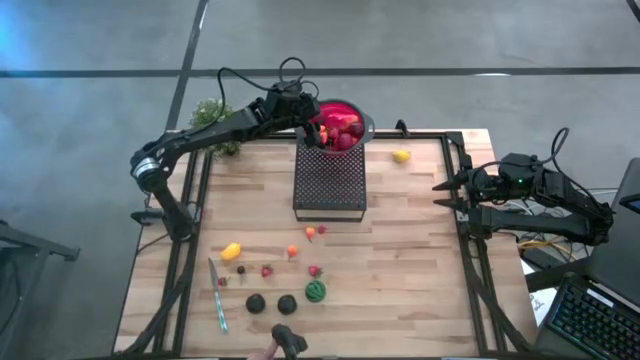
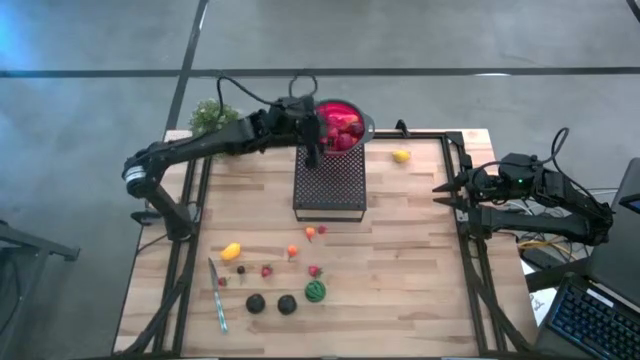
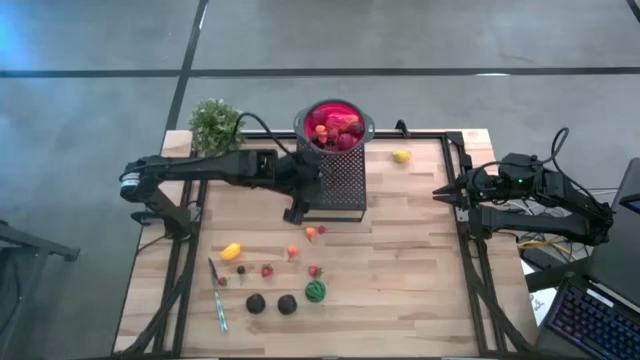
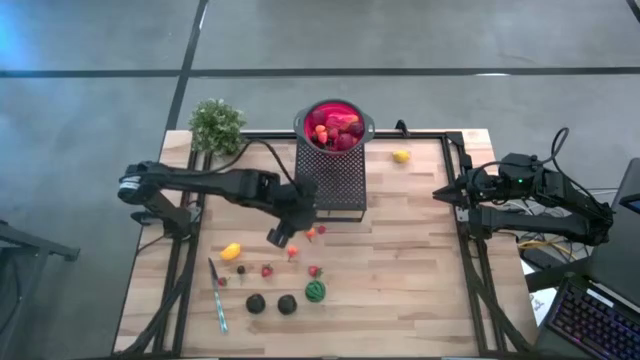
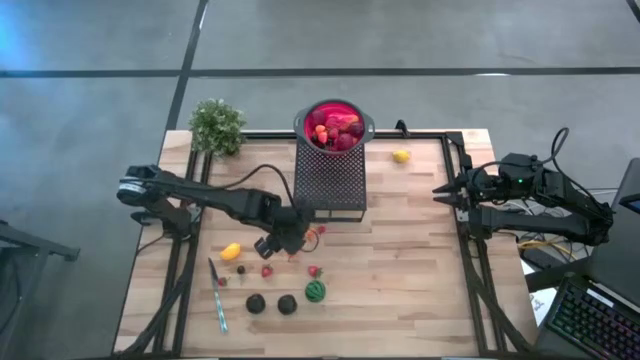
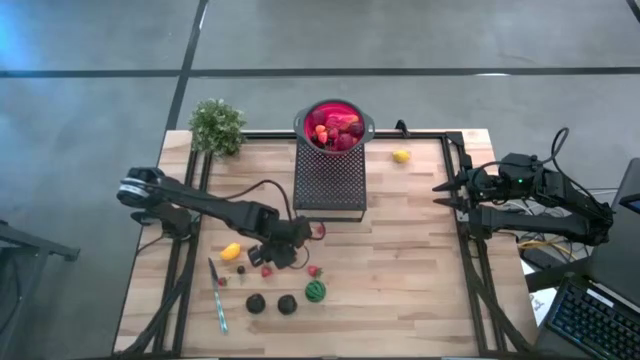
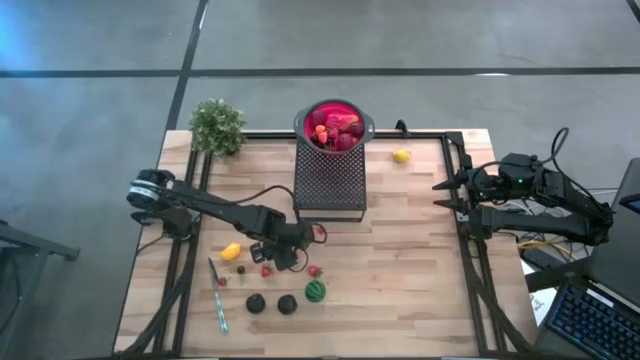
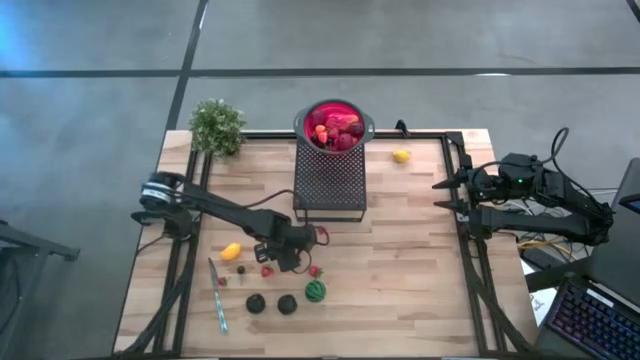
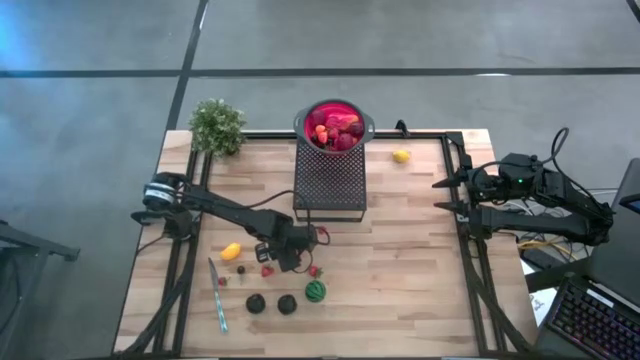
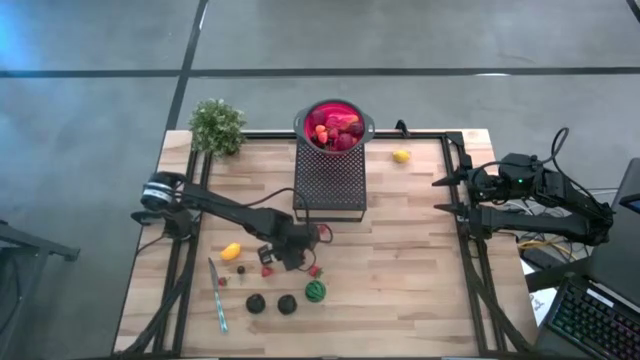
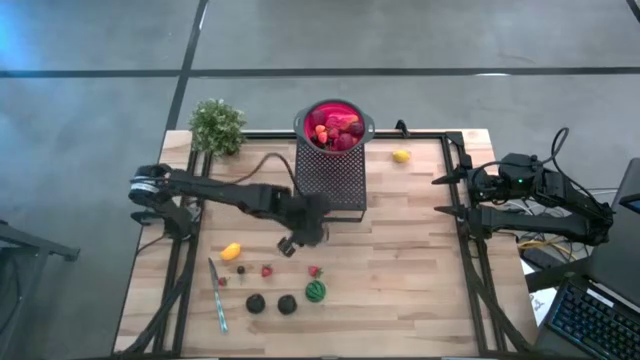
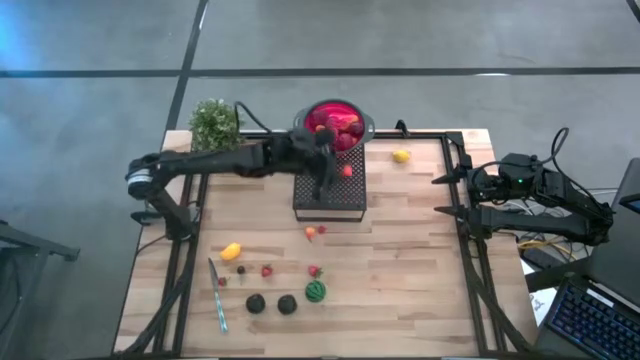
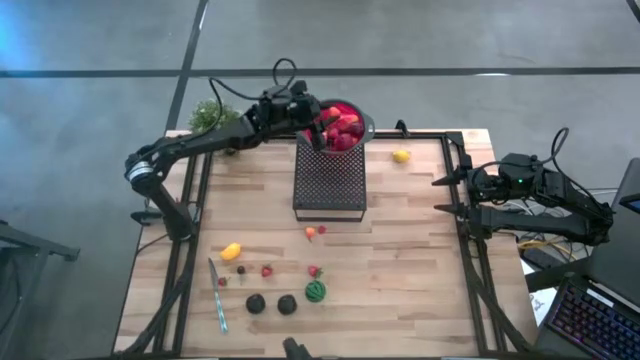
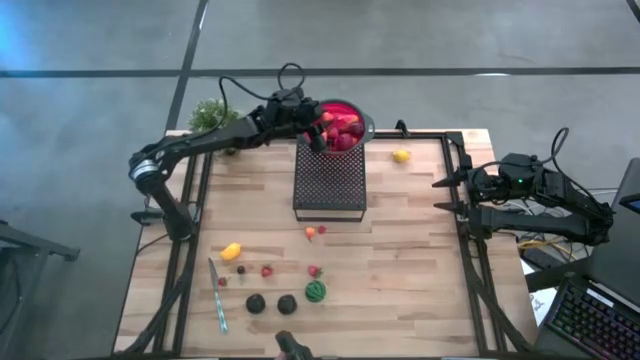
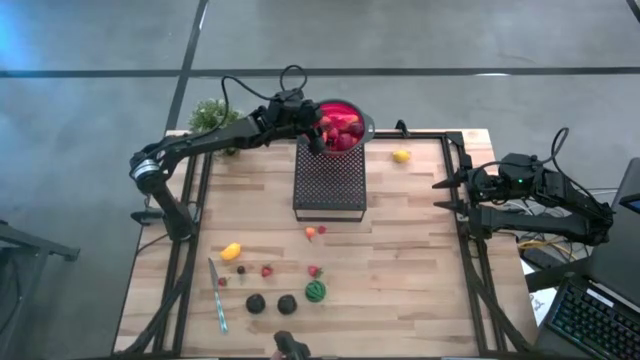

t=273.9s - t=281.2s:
Task: Pick & Place Fruit
Put the pear into the red strainer bowl on the shelf

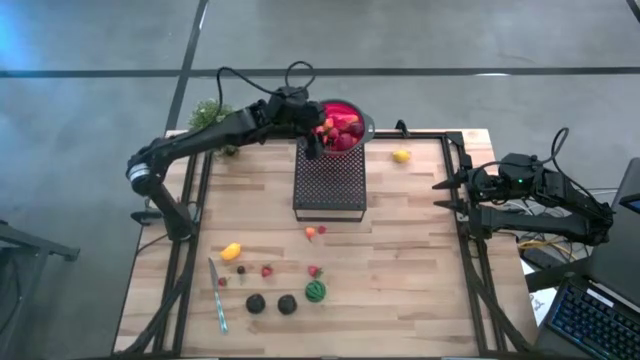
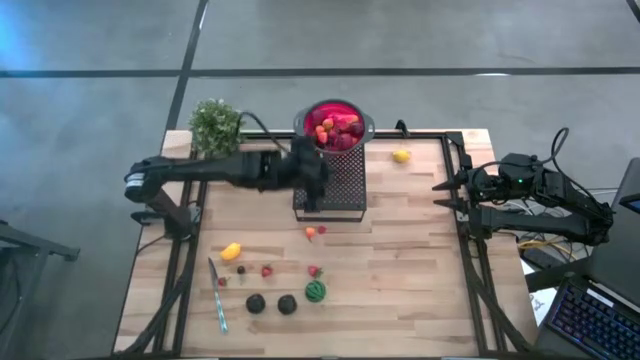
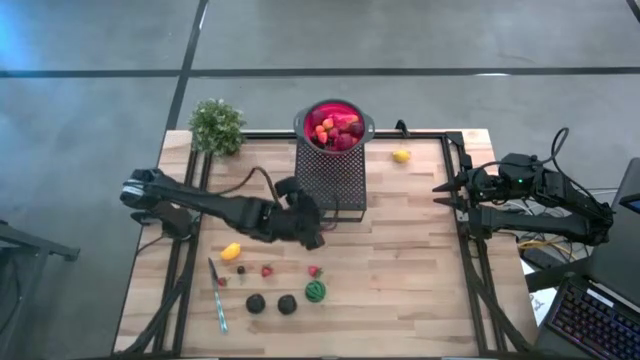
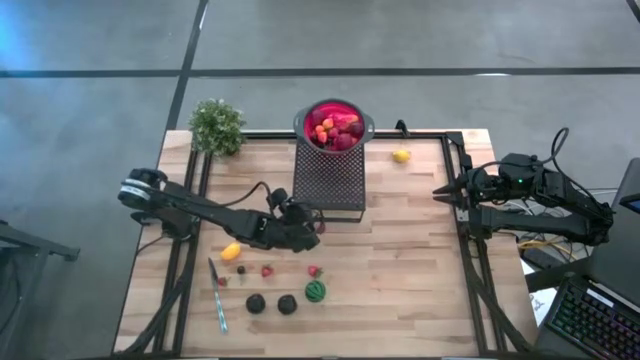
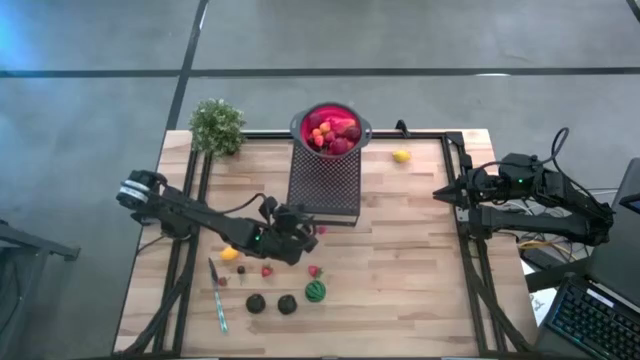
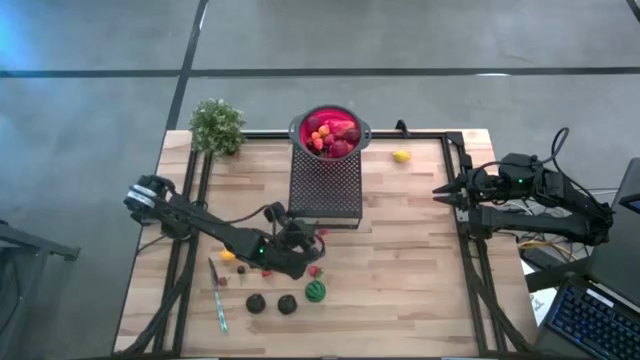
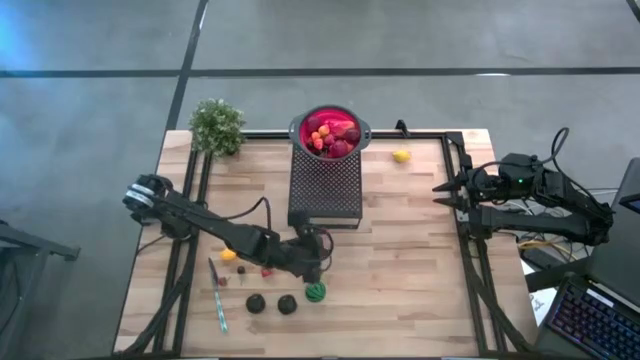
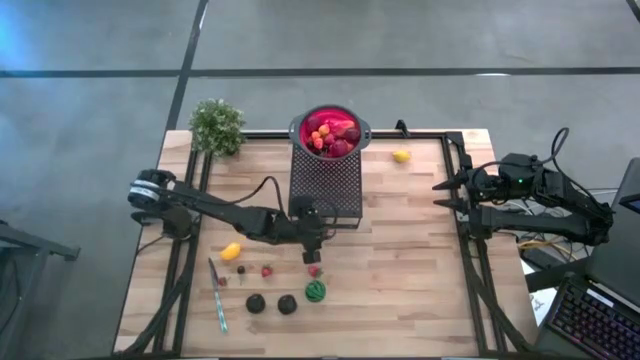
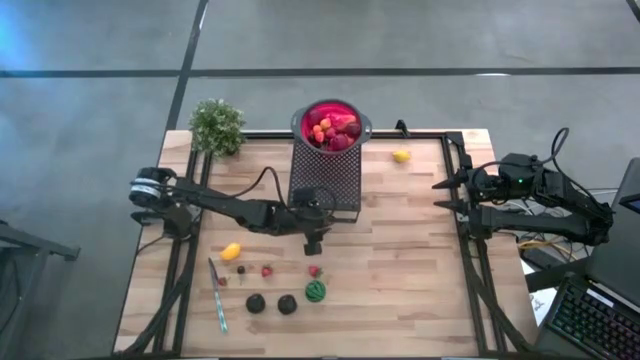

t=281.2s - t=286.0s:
Adjust the shelf on the table

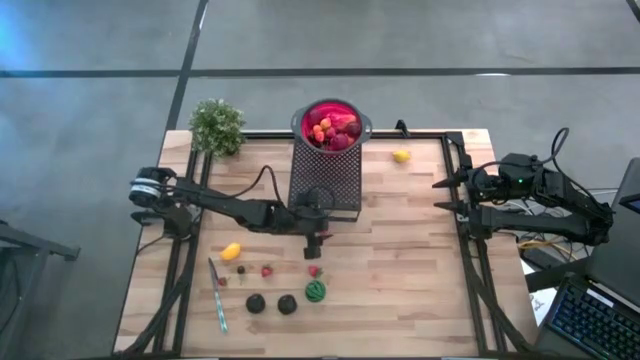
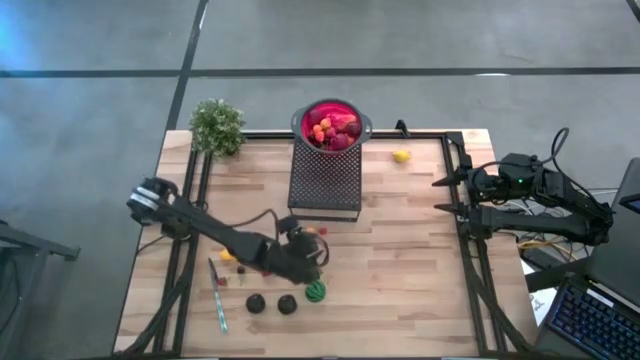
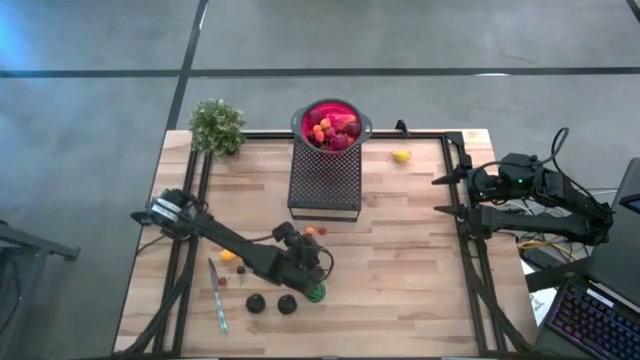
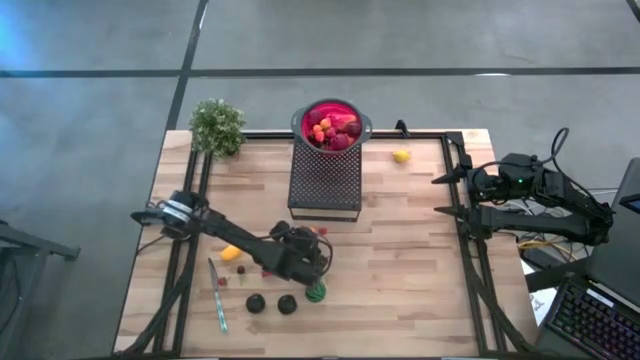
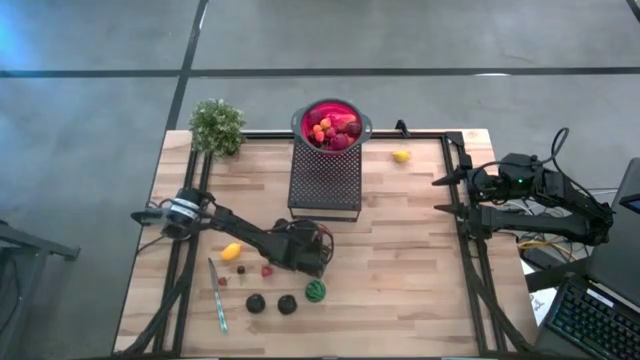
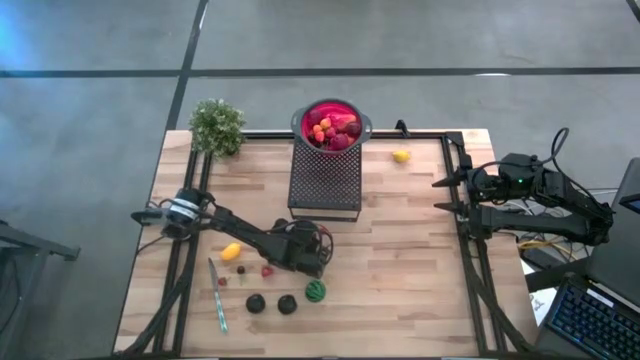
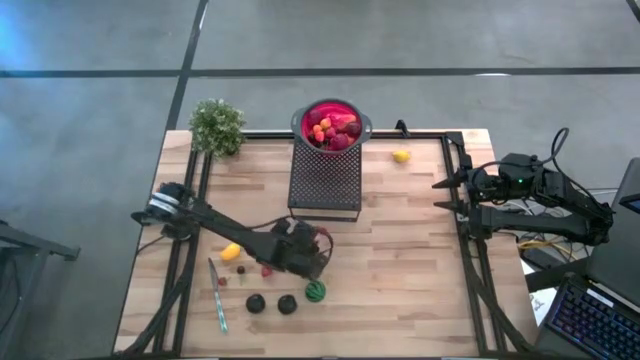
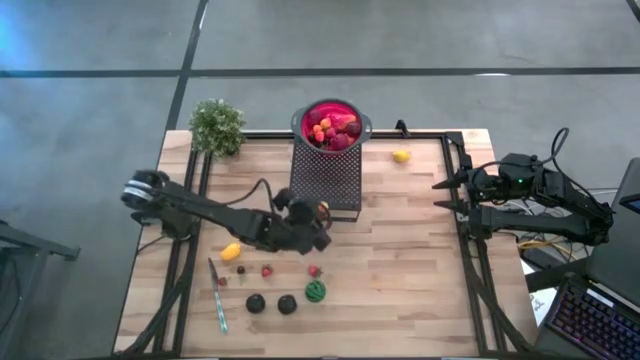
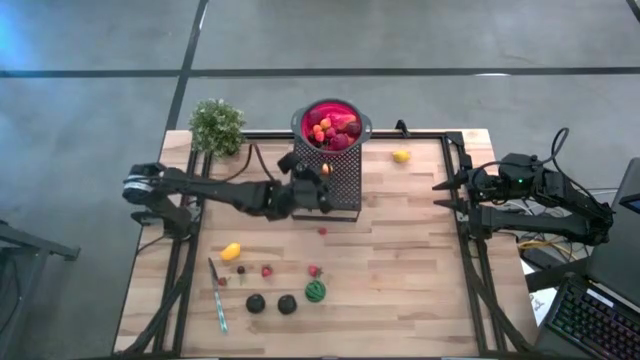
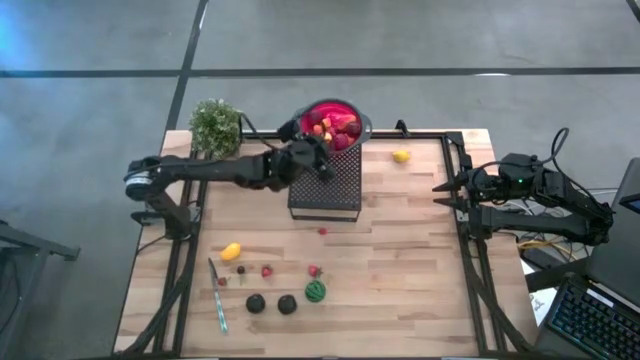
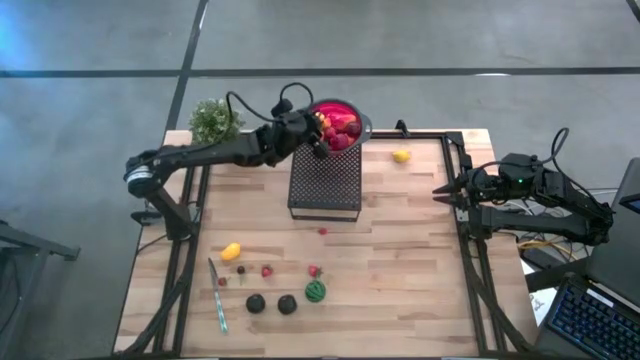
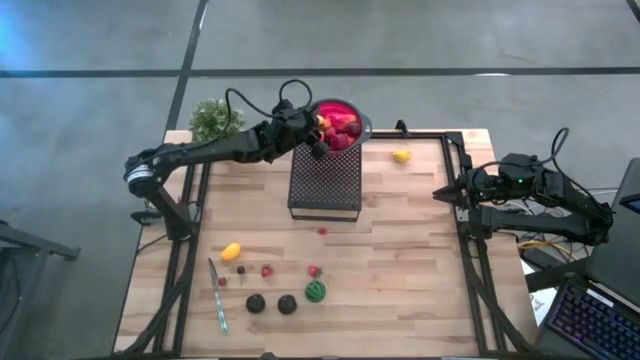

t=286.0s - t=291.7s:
Put the pear into the red strainer bowl on the shelf

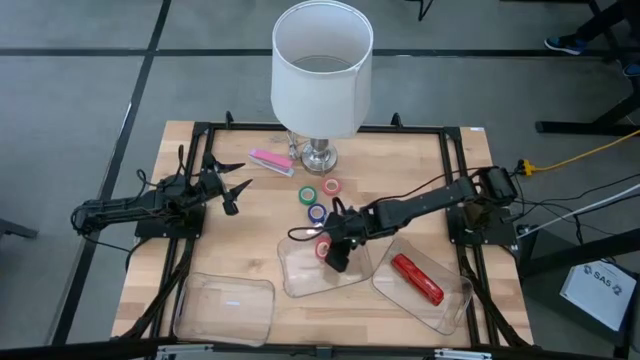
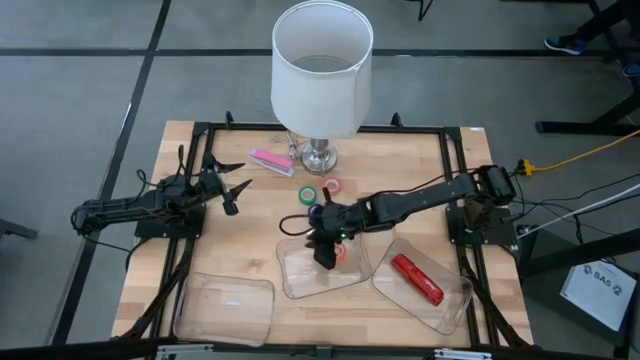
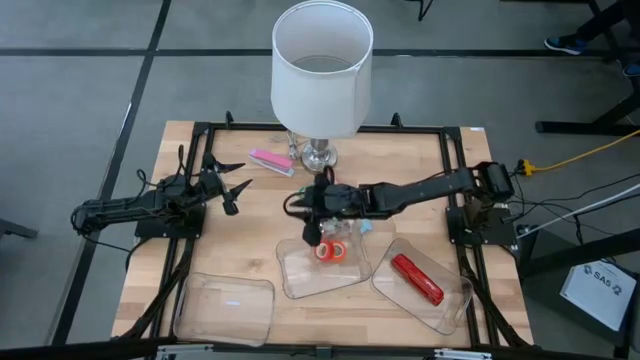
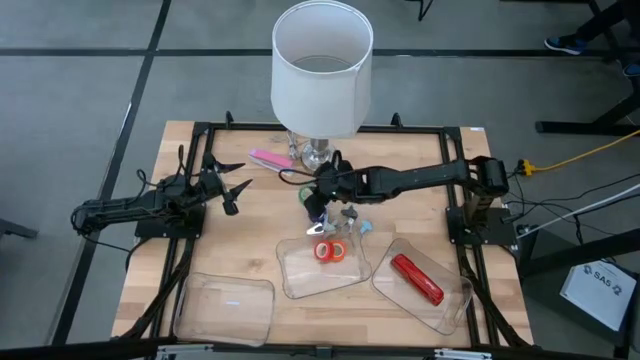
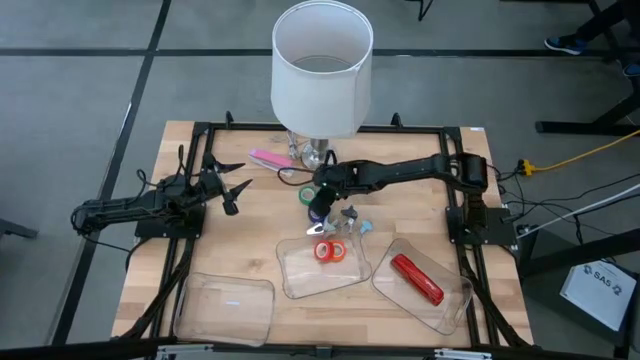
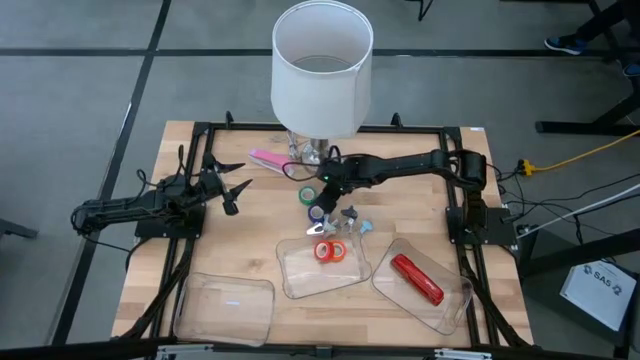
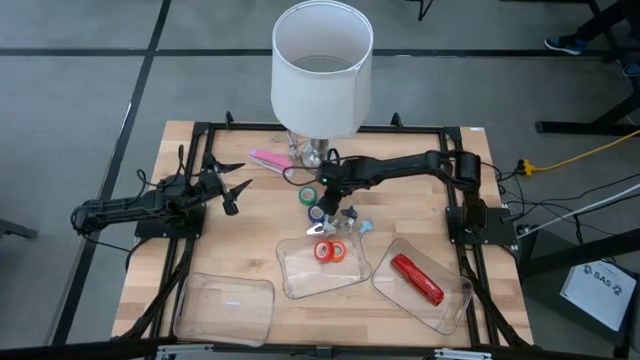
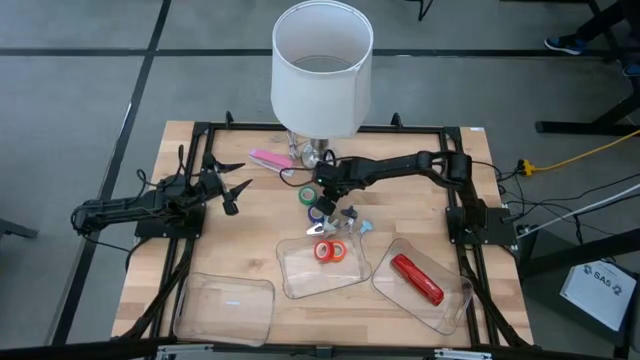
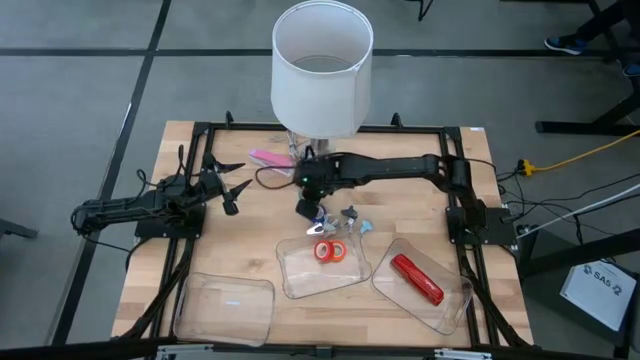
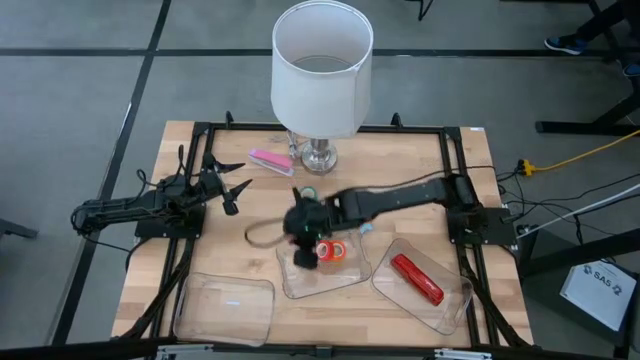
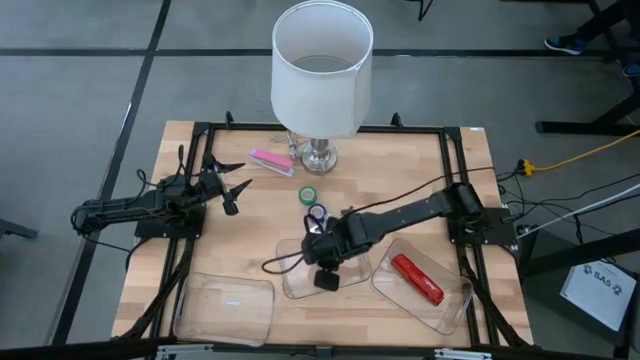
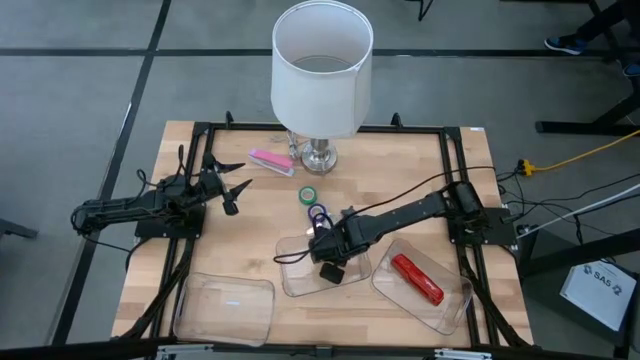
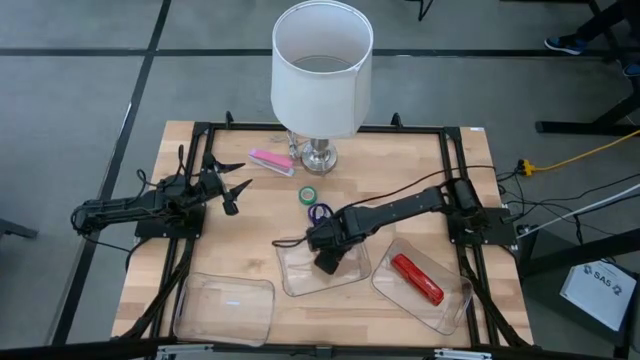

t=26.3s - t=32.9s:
Task: Pick and place Stapler, Stapler remover, tape
Put the pink tape into the top transparent bin
